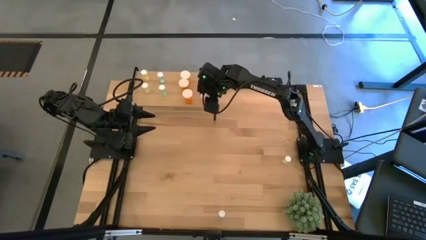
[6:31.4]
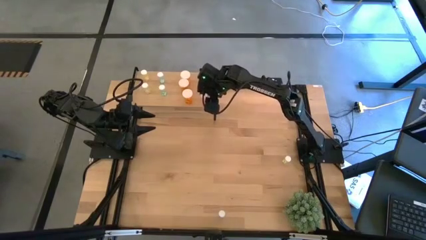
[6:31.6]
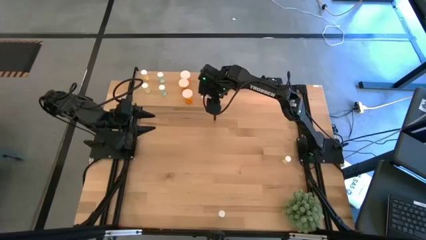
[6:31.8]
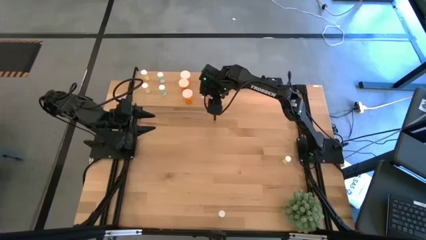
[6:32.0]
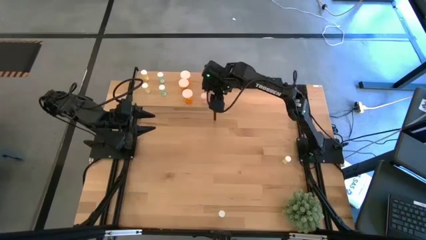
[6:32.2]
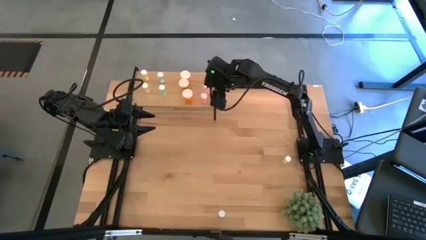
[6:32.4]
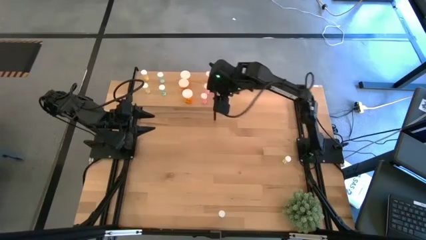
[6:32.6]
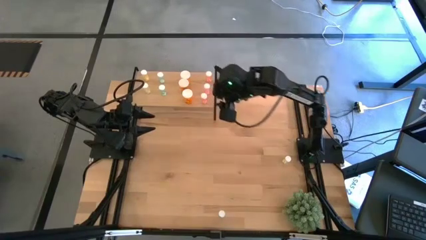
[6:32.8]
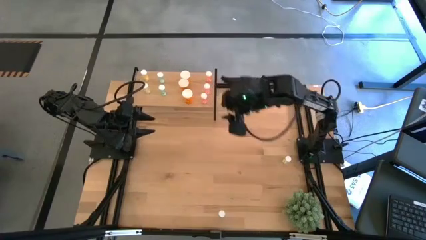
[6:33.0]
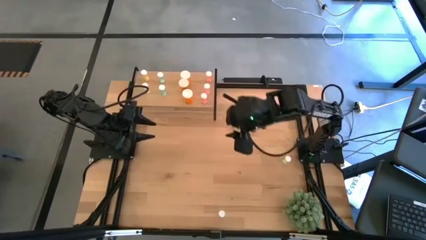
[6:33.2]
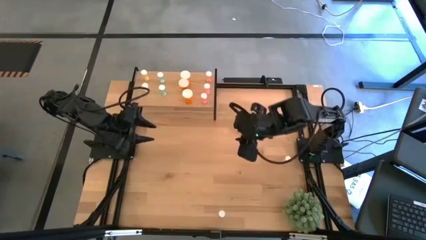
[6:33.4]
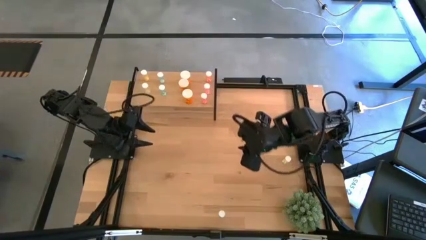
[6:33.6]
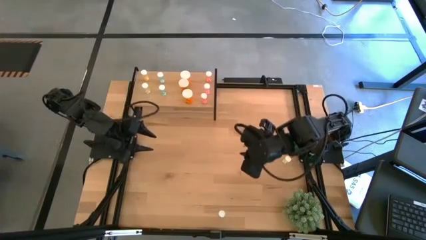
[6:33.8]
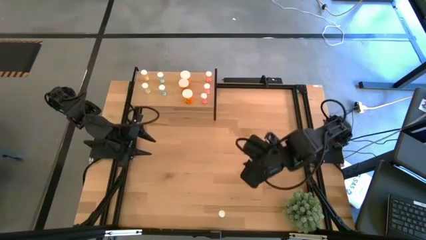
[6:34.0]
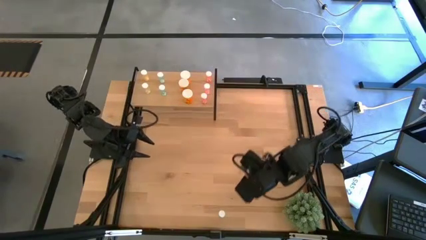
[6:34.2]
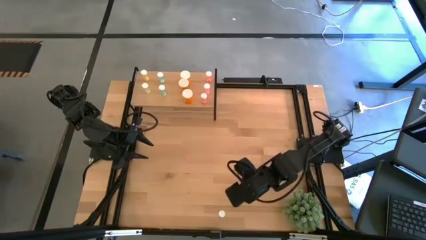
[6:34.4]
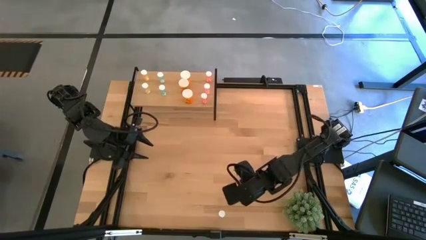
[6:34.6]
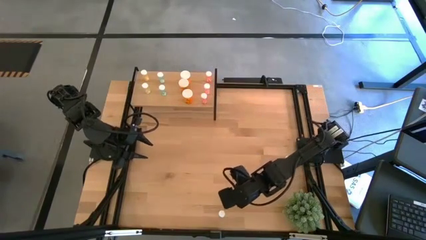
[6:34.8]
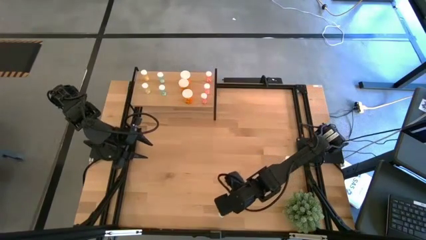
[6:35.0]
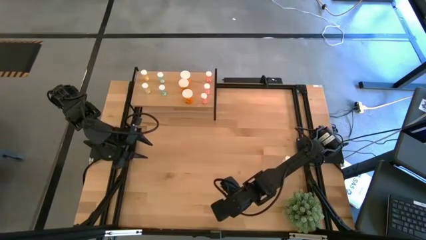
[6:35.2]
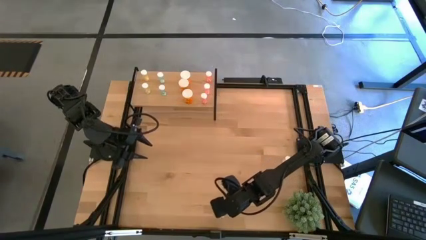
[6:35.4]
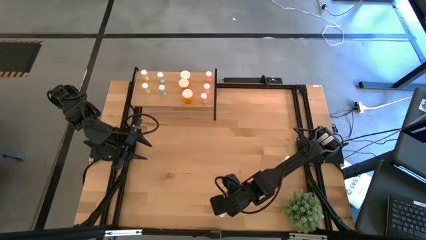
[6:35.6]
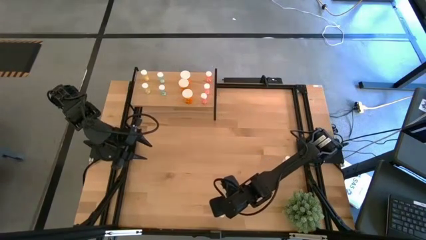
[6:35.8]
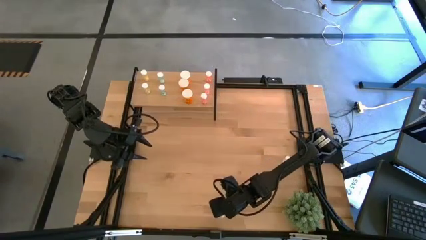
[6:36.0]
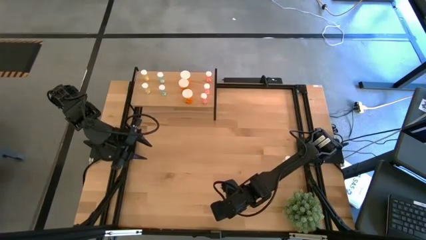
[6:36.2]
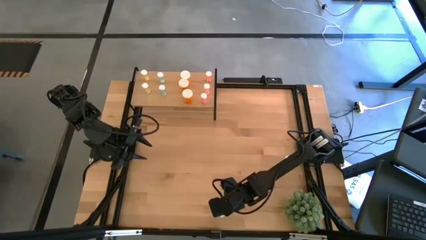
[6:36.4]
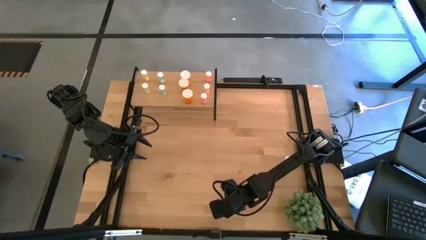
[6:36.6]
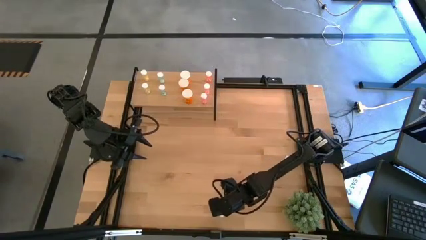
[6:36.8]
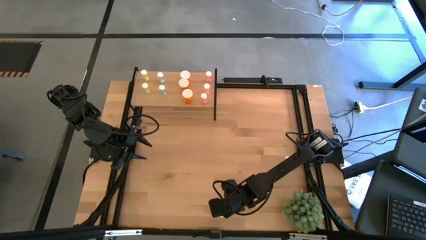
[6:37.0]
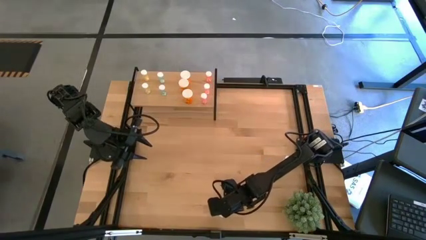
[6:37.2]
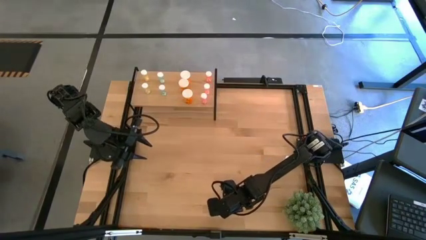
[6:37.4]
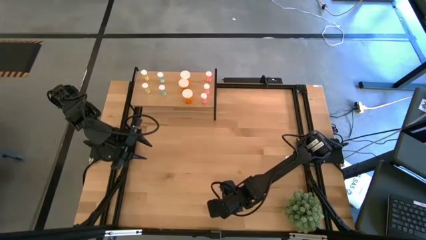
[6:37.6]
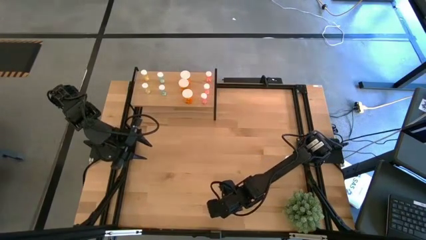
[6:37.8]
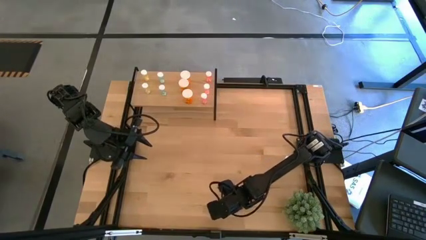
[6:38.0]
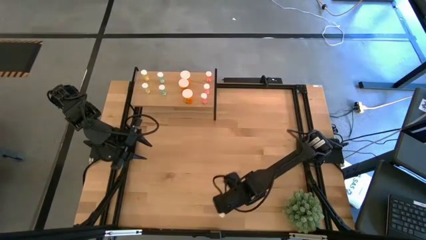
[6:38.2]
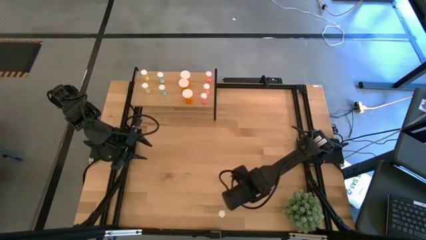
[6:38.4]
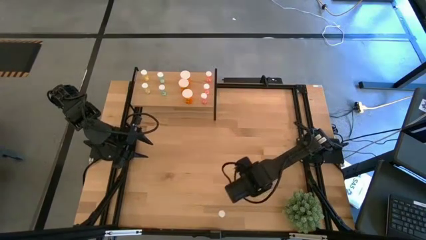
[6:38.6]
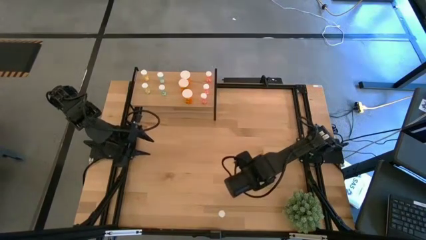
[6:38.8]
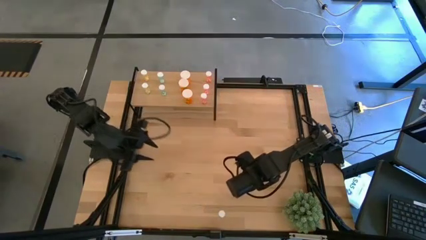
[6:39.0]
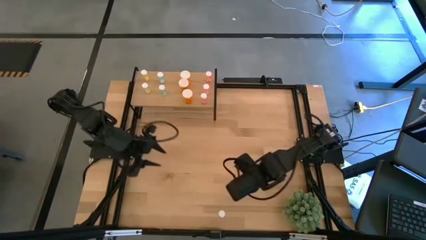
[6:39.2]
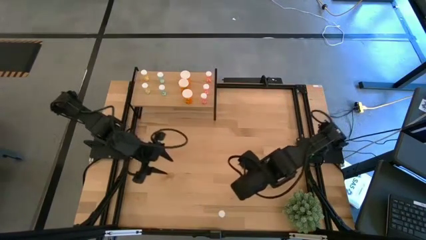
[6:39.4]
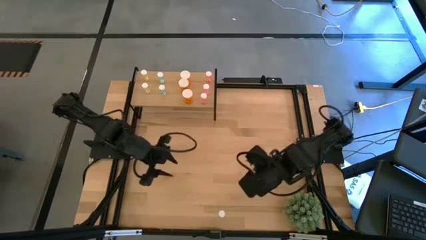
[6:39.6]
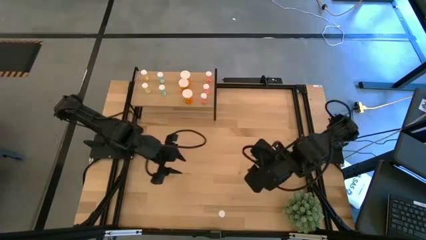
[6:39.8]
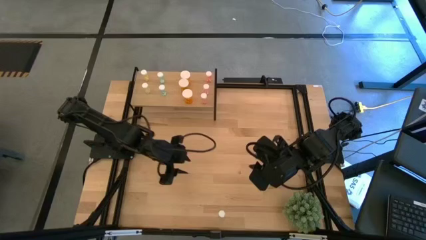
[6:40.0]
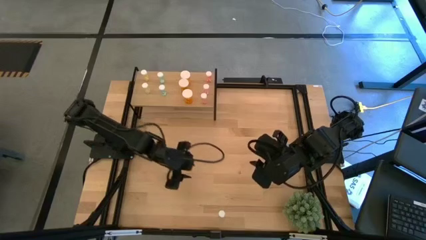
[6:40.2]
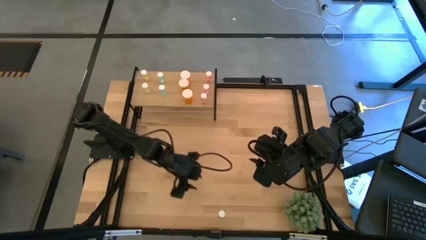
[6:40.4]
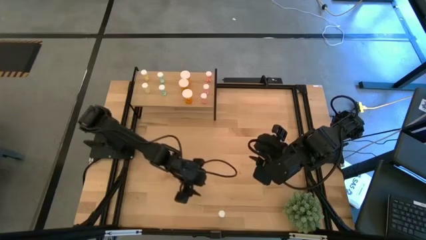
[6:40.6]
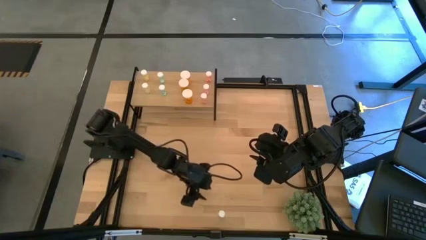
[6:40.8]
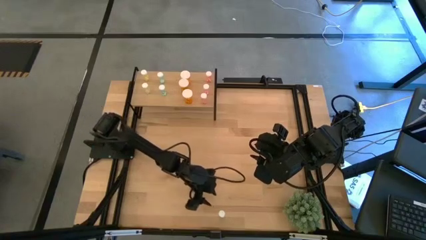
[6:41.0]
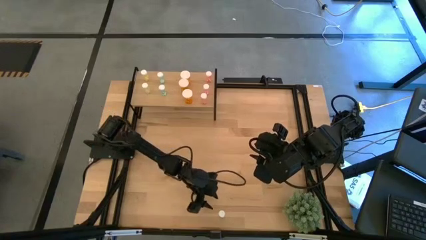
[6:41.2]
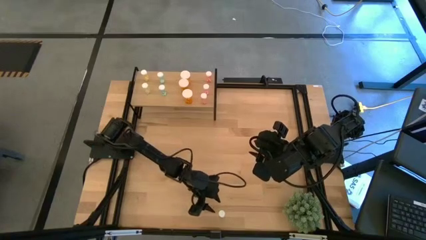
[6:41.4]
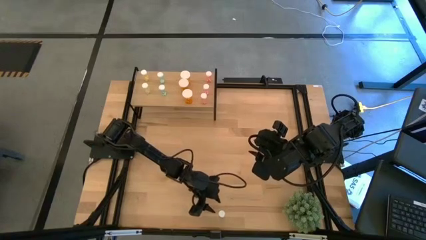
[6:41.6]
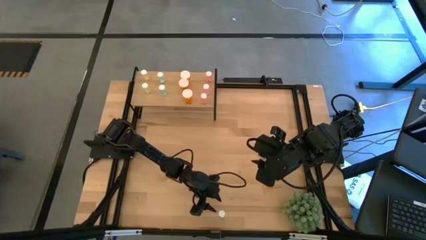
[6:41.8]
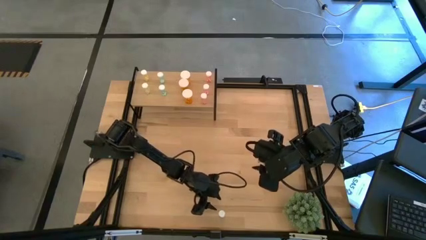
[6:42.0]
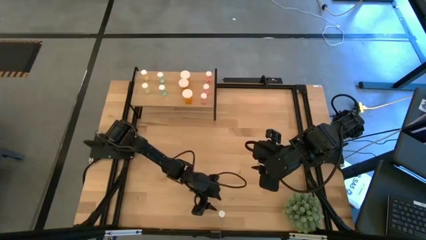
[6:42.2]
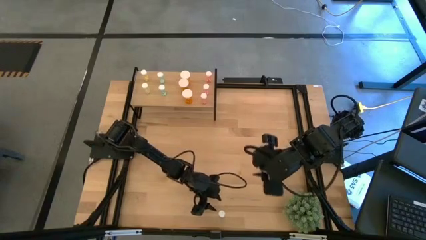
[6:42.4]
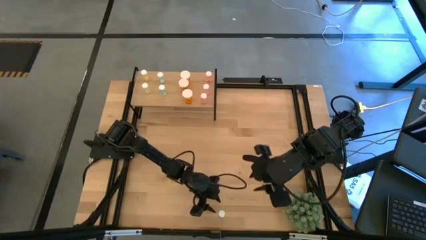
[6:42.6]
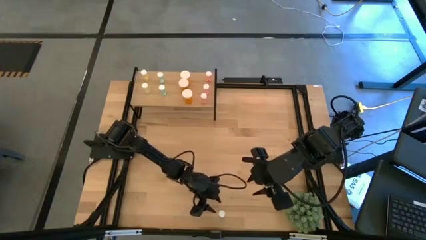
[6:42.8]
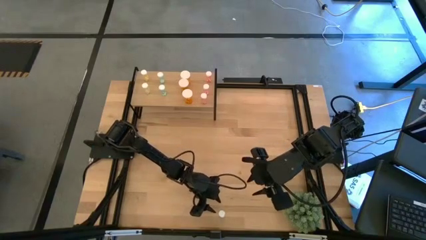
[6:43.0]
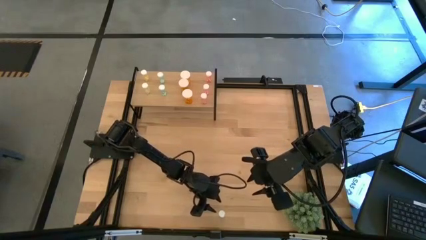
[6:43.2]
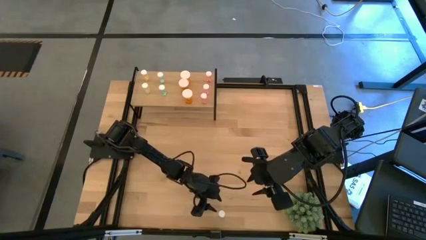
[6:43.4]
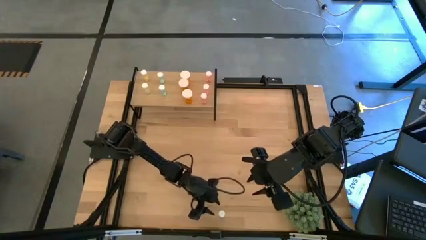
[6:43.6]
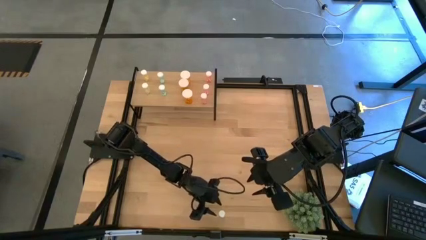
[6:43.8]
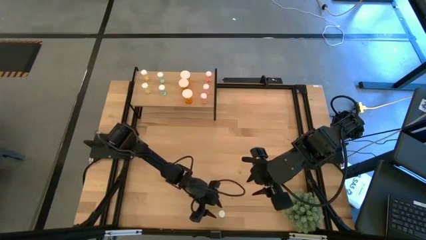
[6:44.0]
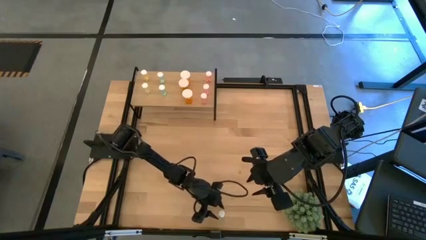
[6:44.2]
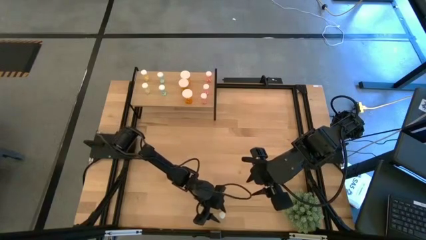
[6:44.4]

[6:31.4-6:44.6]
Task: Pick and place medicine bottles onto shelf by color
Put the blue pill bottle on the shelf aligned with the blue pill bottle on the shelf
